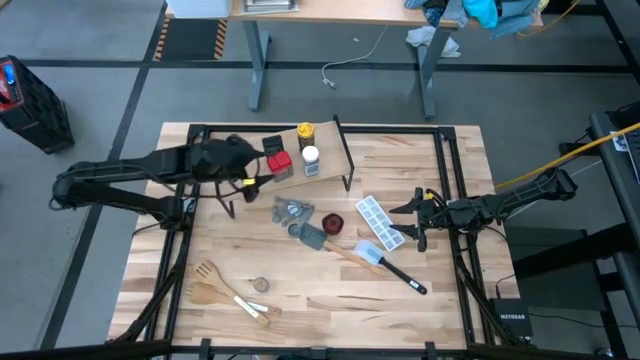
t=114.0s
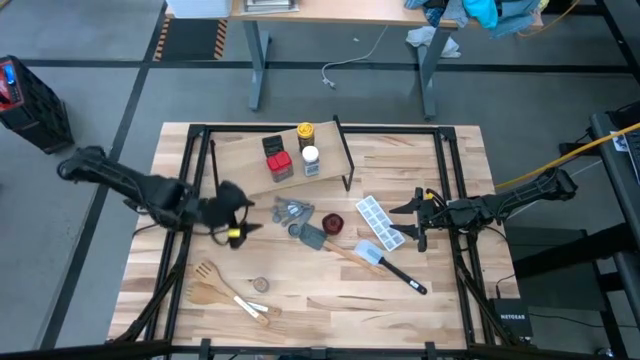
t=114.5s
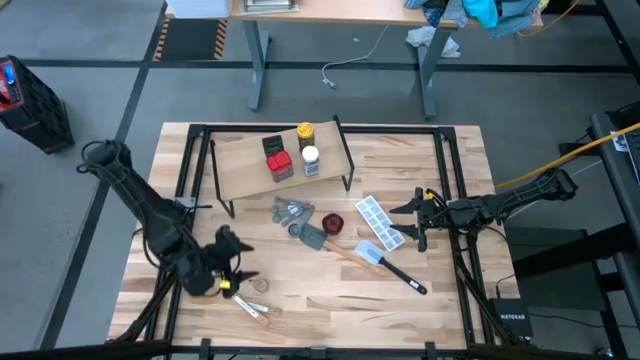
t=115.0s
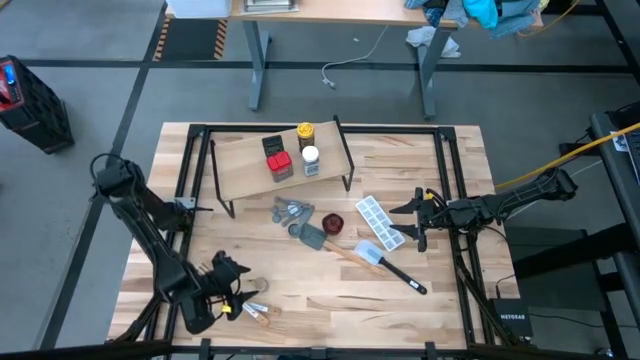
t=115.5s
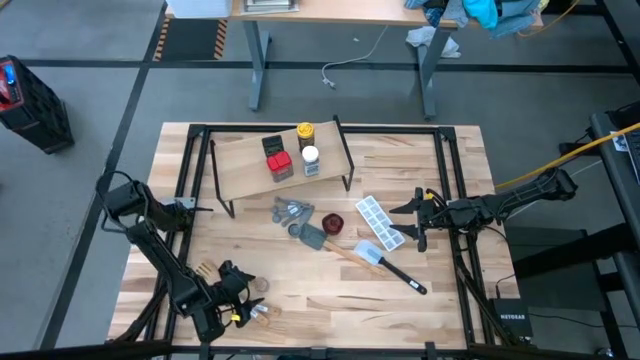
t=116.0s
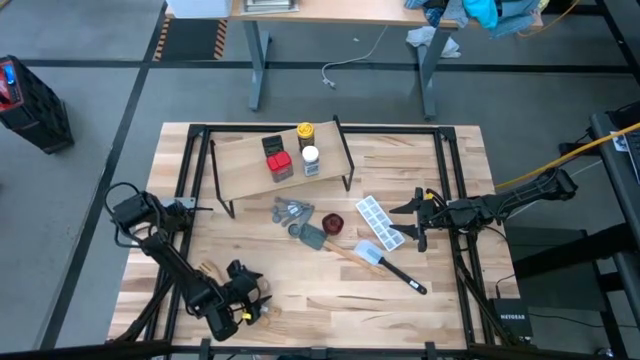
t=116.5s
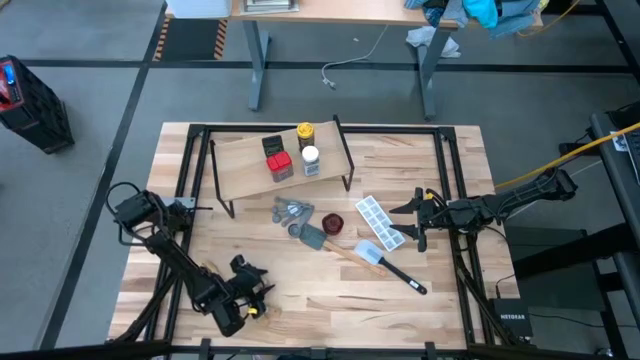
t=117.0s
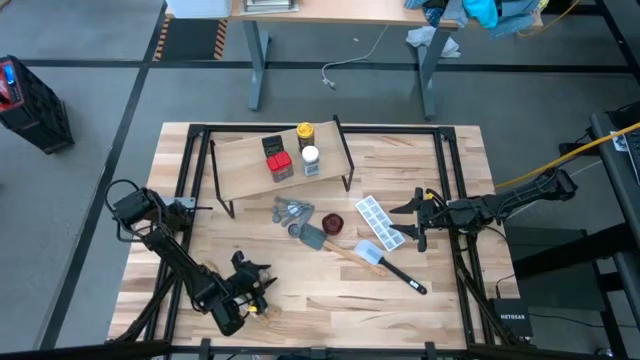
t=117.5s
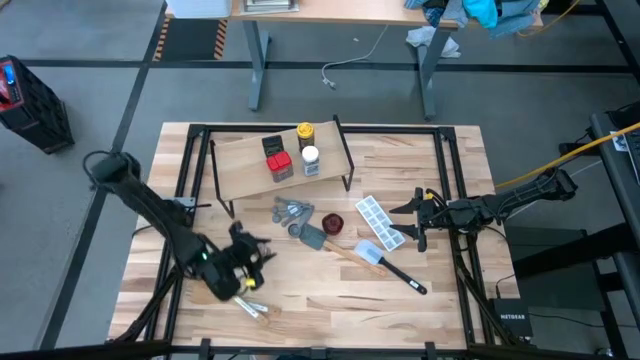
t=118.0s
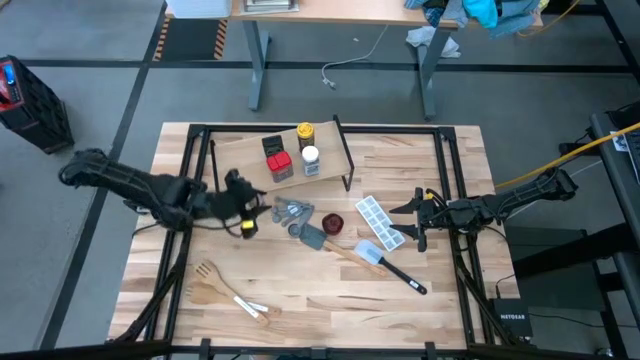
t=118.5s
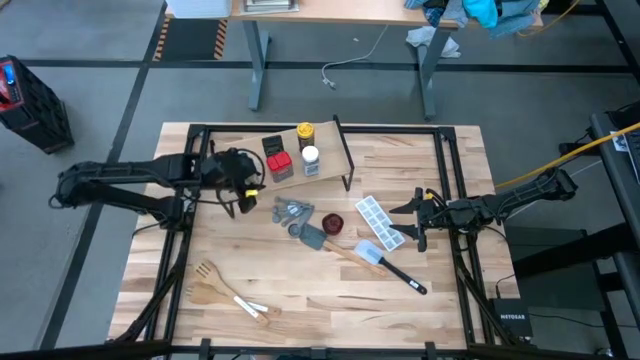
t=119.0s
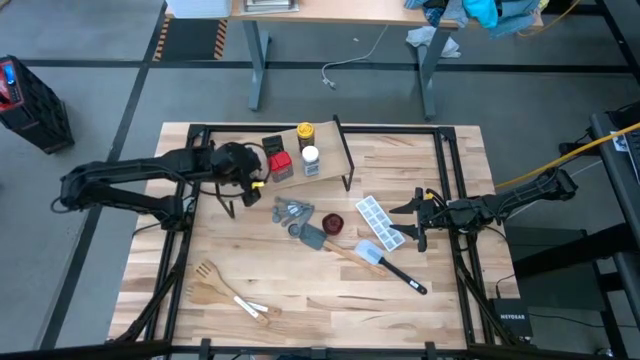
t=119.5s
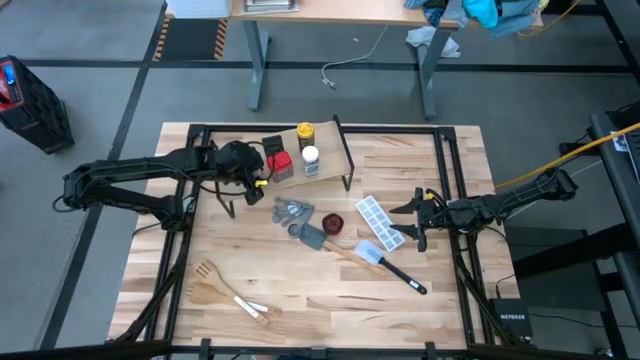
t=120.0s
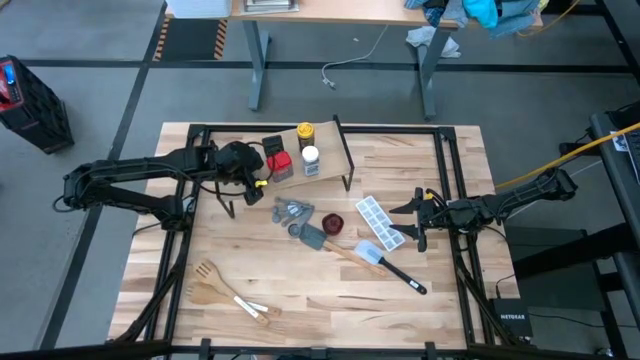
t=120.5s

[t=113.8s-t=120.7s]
Task: Shelf spices
Put the brown seasoning bottle on the shelf

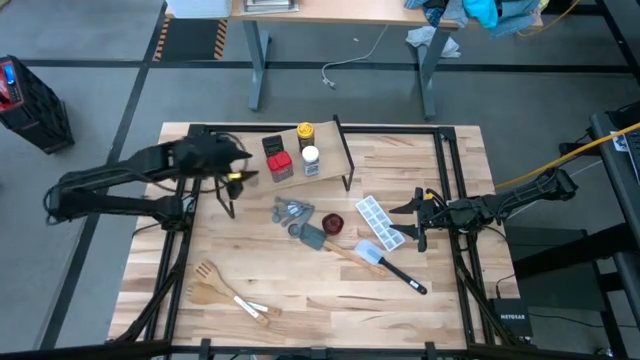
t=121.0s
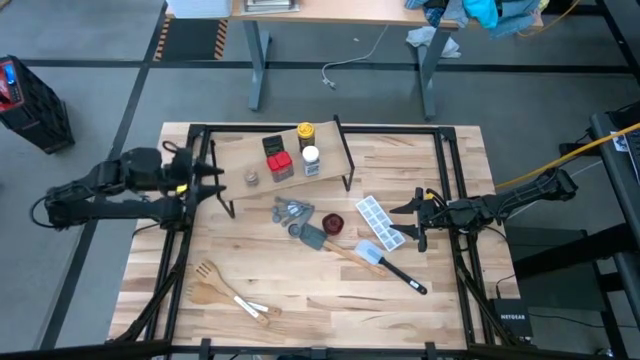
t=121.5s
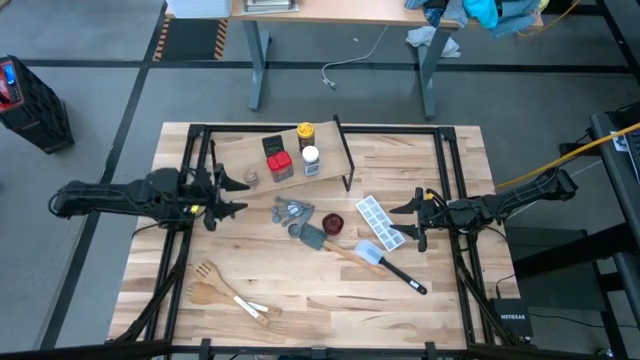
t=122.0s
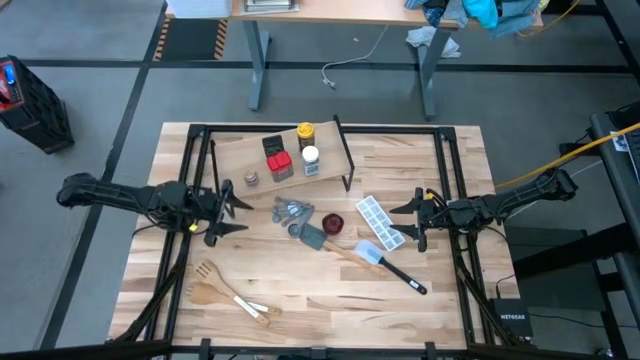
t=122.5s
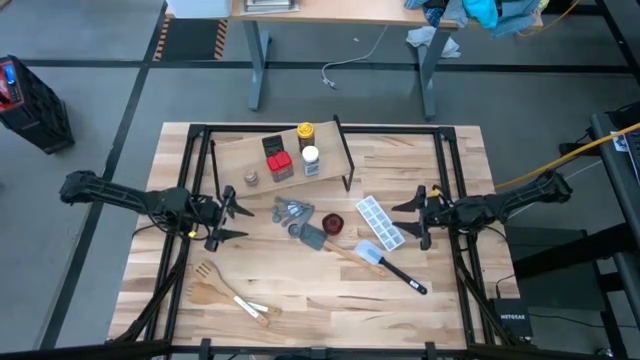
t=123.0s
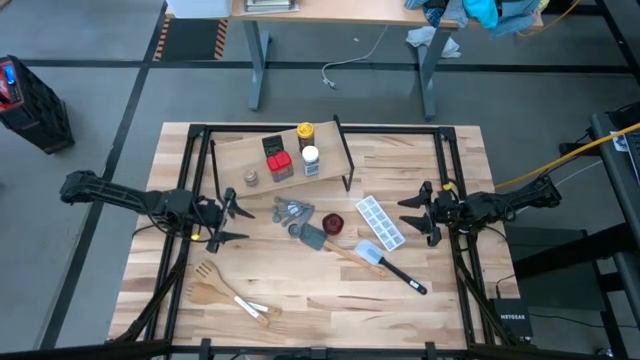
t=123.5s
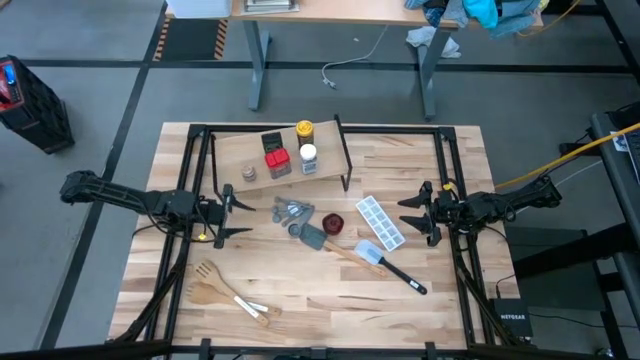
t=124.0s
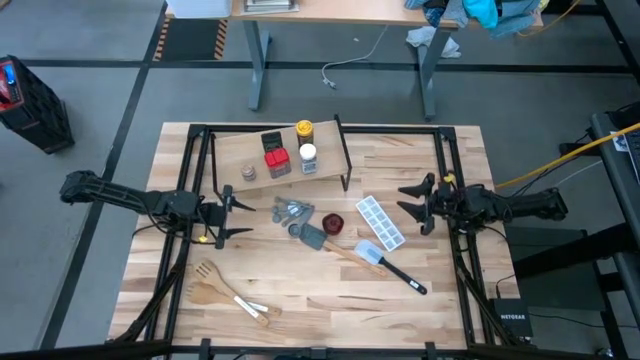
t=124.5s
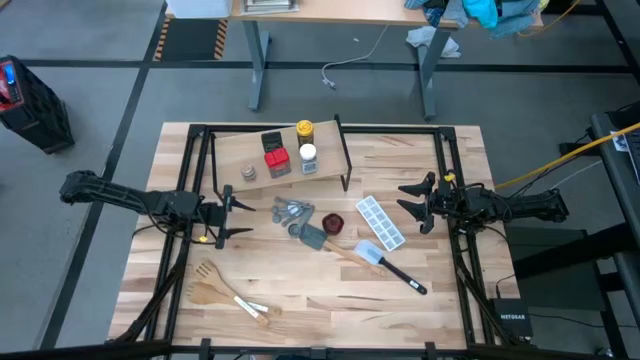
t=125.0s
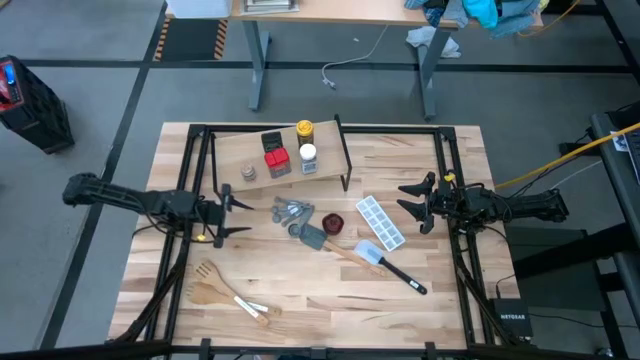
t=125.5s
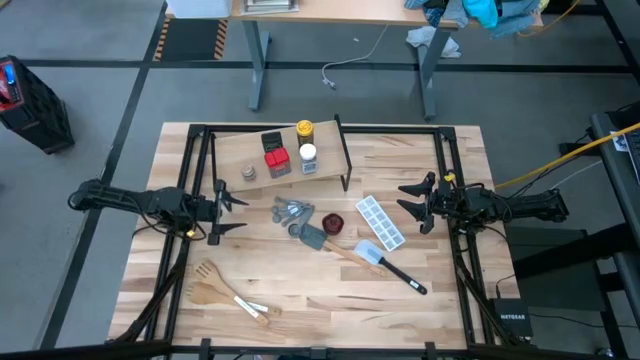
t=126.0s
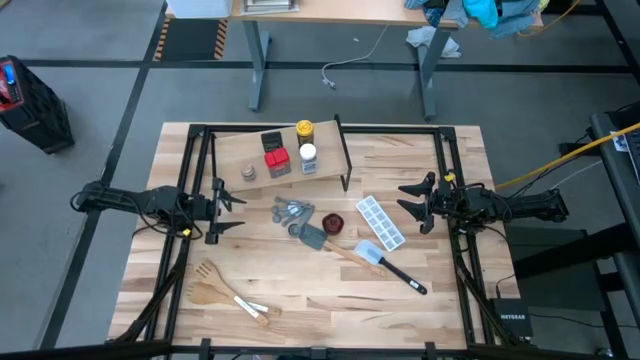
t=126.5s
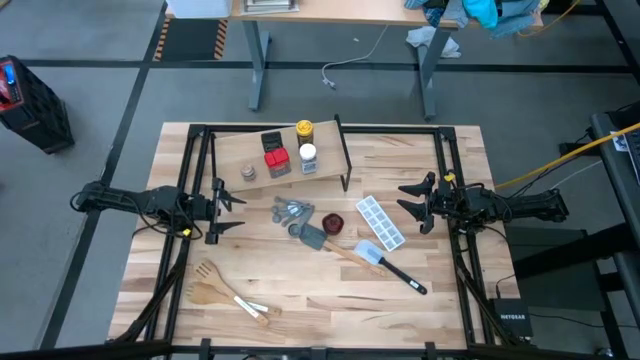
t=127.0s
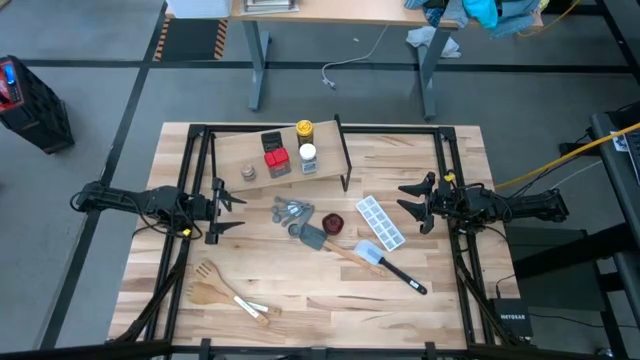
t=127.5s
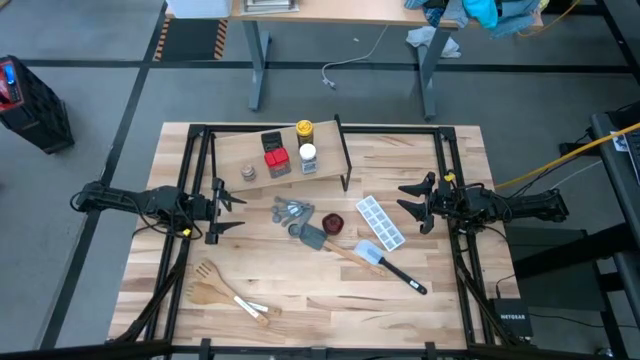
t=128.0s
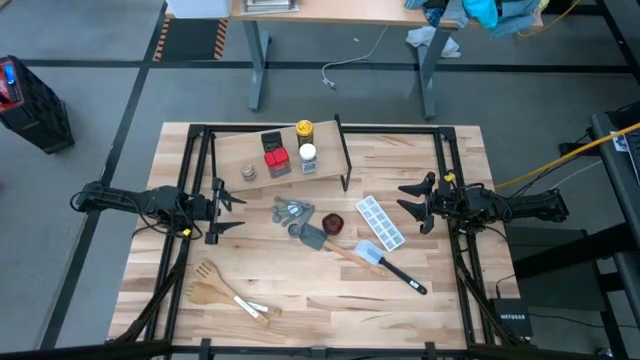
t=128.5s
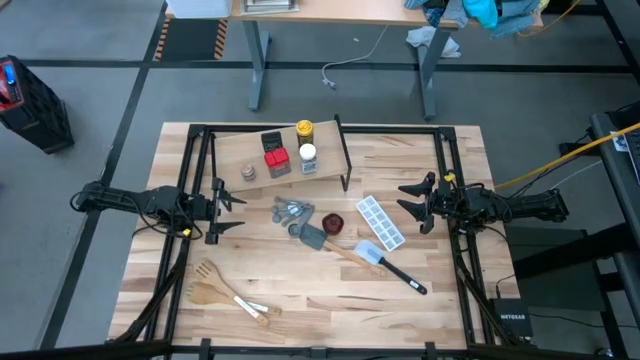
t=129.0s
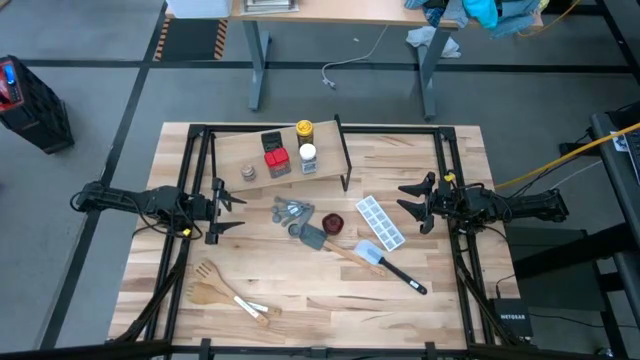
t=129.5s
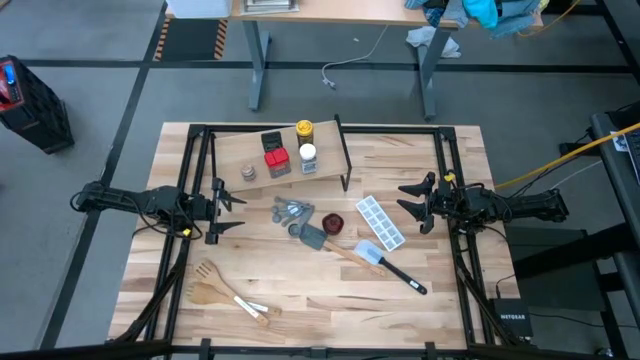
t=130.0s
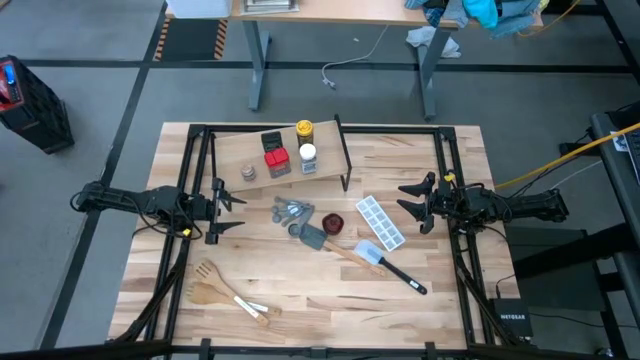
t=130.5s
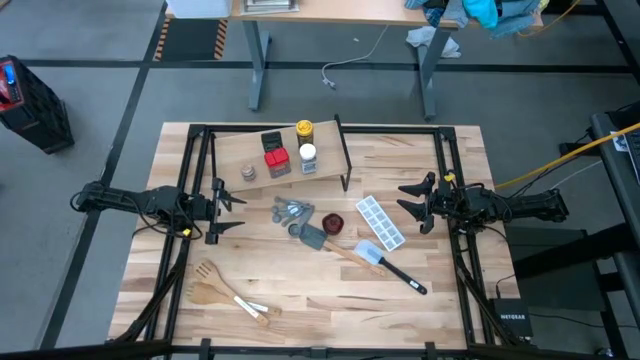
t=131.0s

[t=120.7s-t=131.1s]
Return to Home Position

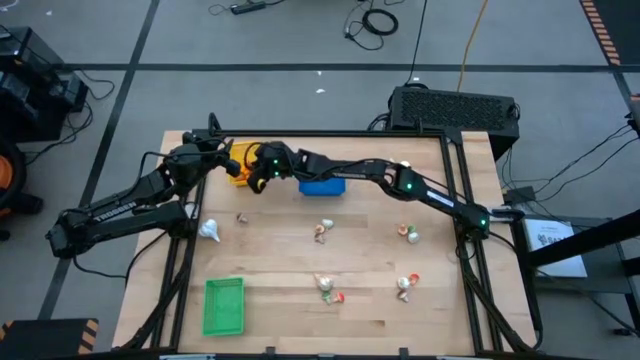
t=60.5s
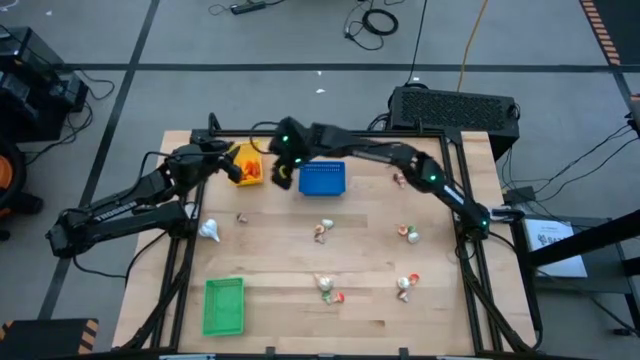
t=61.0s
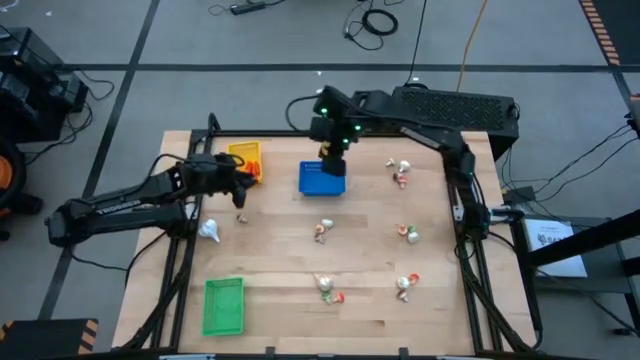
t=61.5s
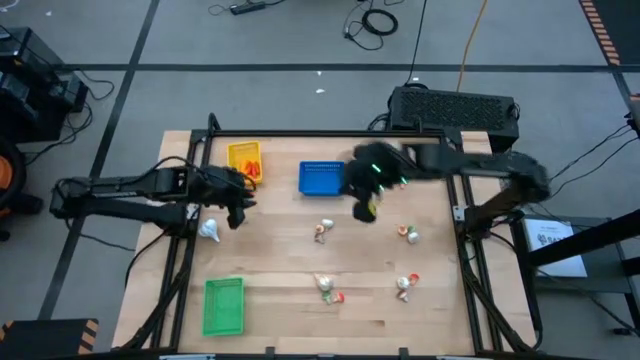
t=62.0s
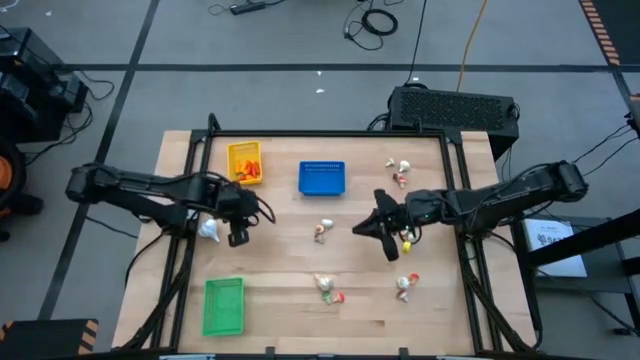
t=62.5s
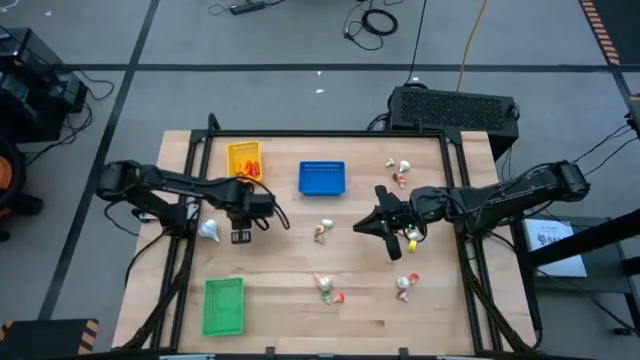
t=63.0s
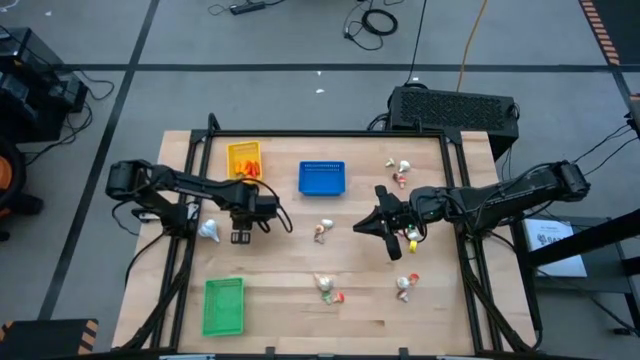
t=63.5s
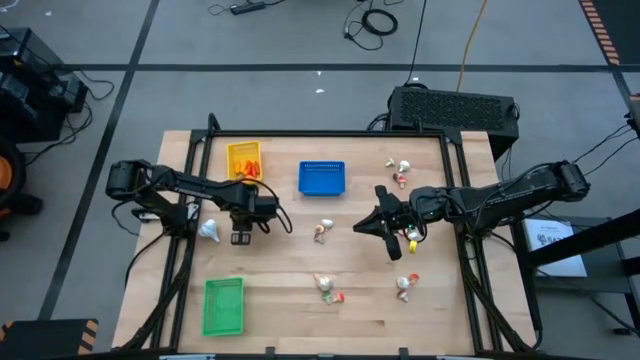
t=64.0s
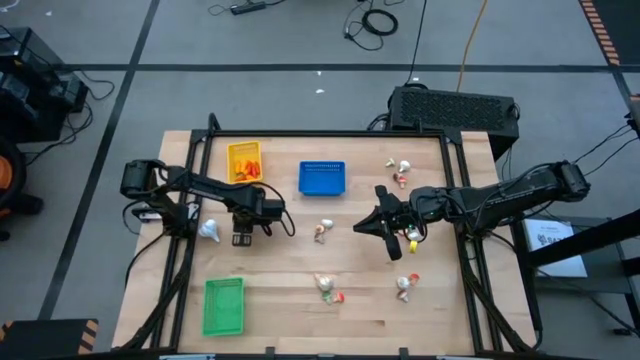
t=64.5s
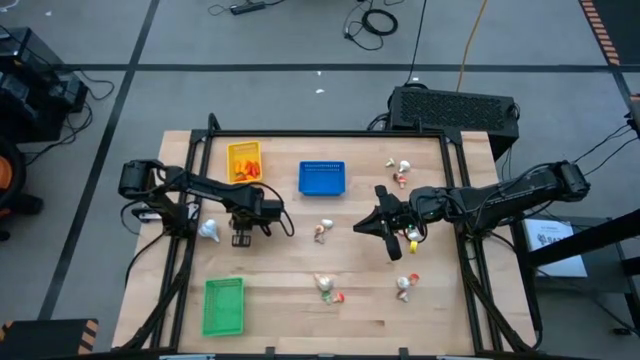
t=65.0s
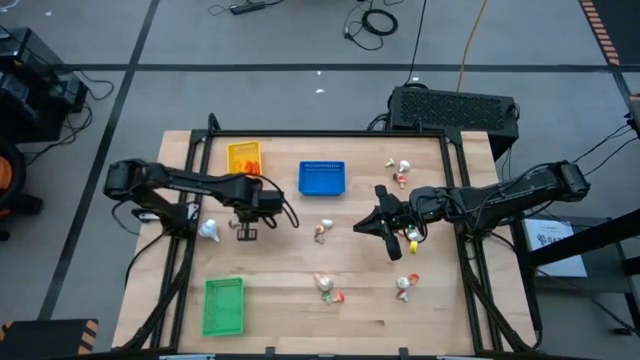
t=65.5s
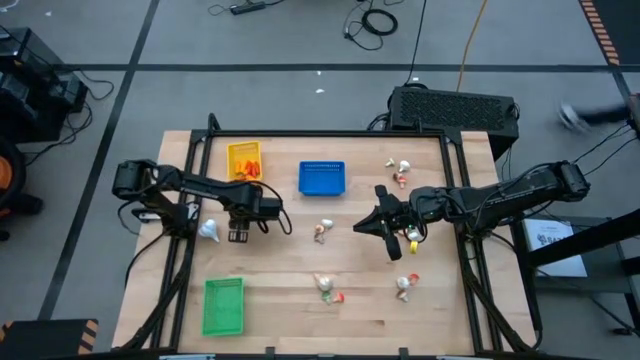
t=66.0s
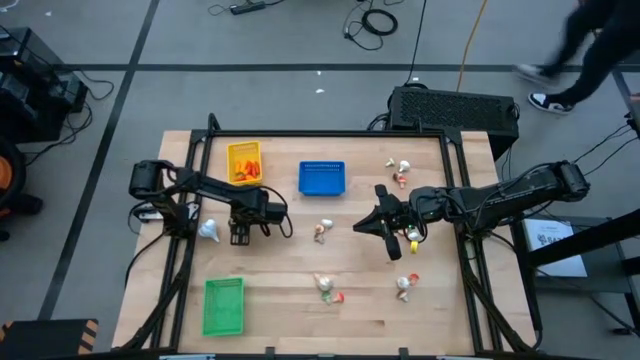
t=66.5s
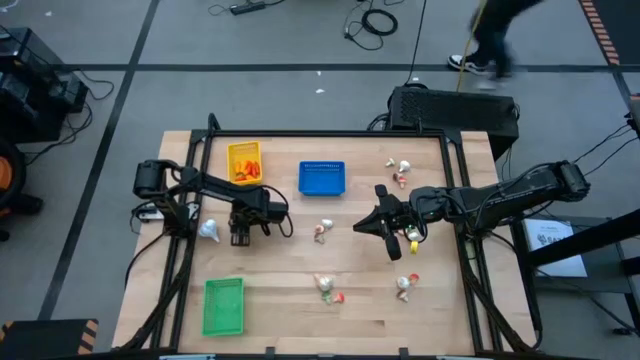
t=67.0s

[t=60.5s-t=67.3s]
Task: Sort produce into baskets
Put the brown mushroom into the blue bin
